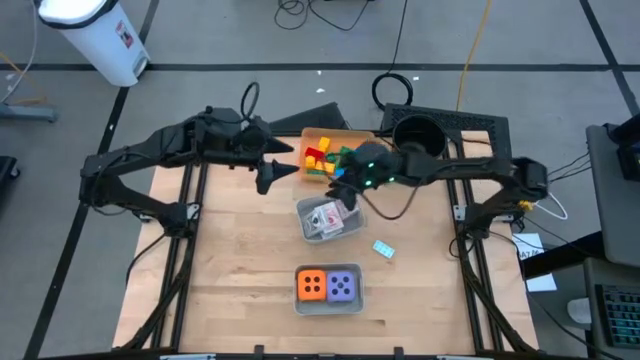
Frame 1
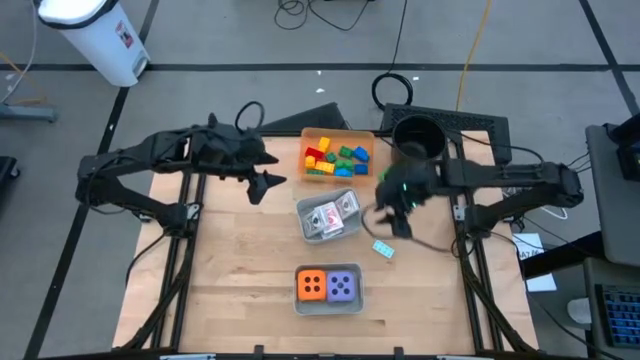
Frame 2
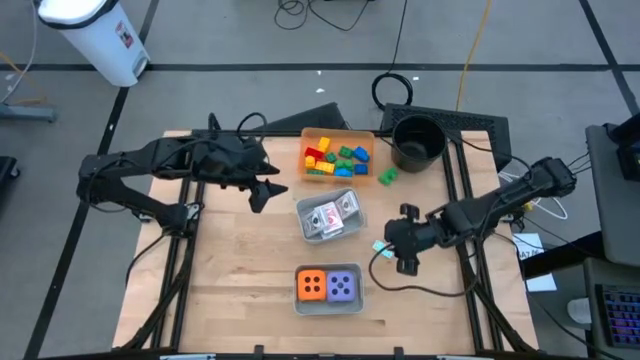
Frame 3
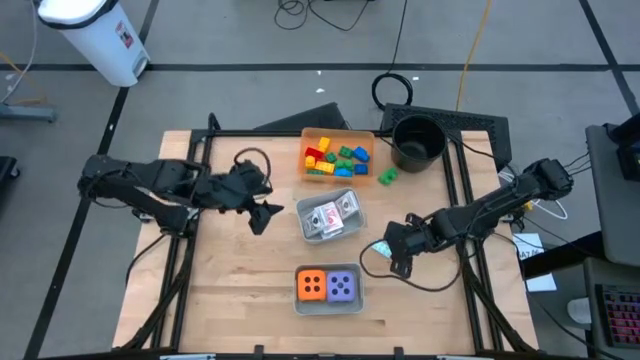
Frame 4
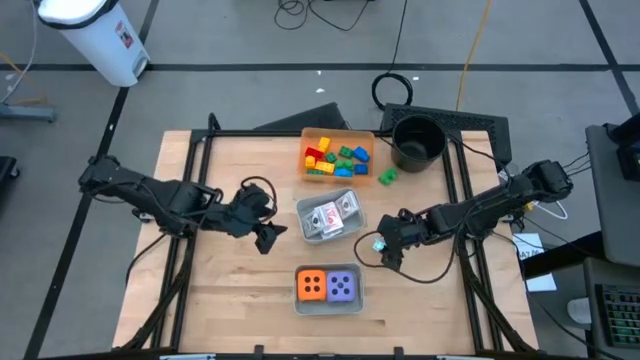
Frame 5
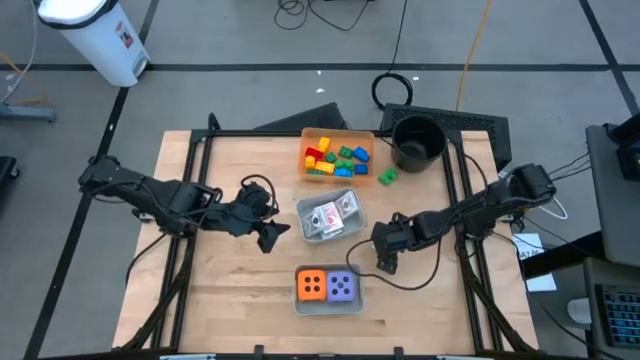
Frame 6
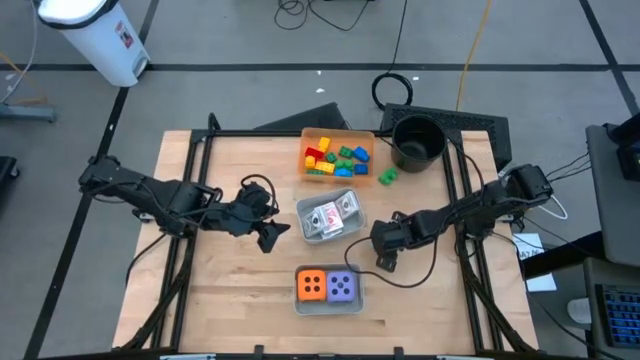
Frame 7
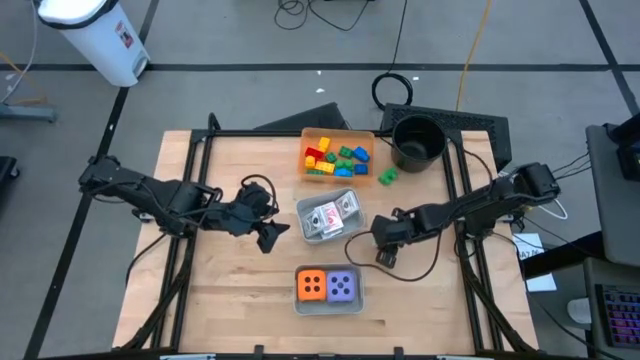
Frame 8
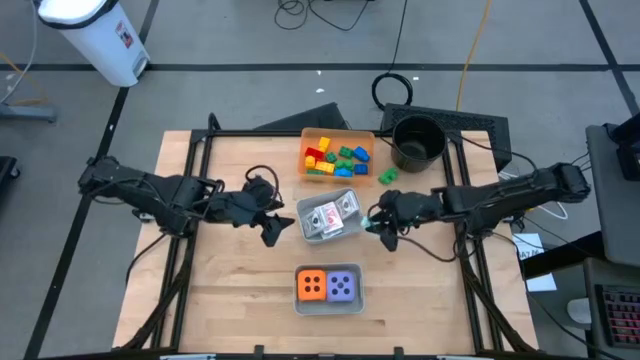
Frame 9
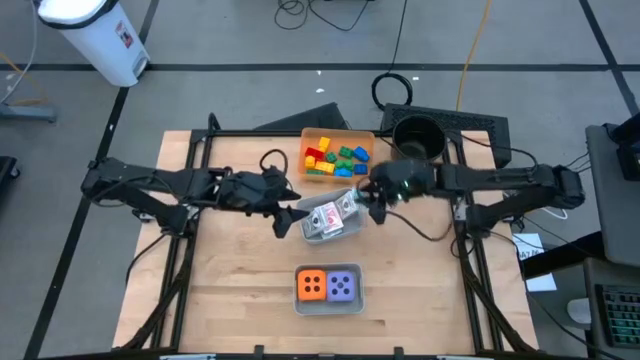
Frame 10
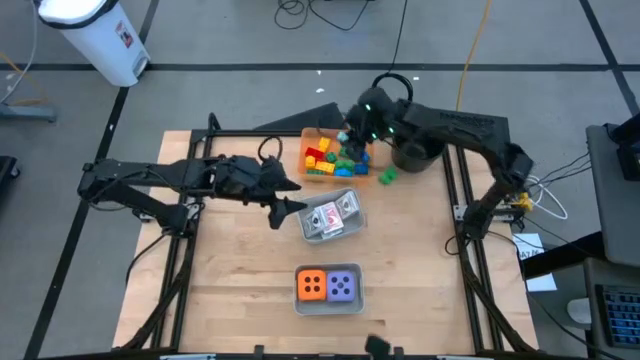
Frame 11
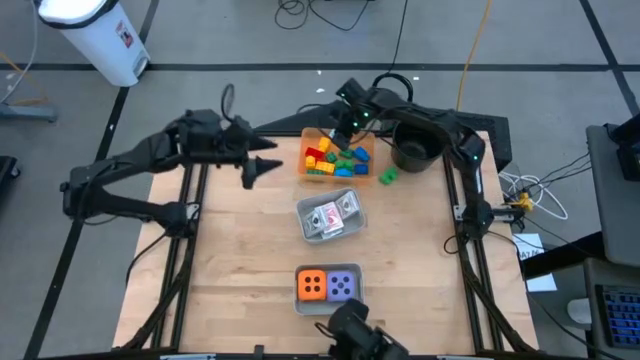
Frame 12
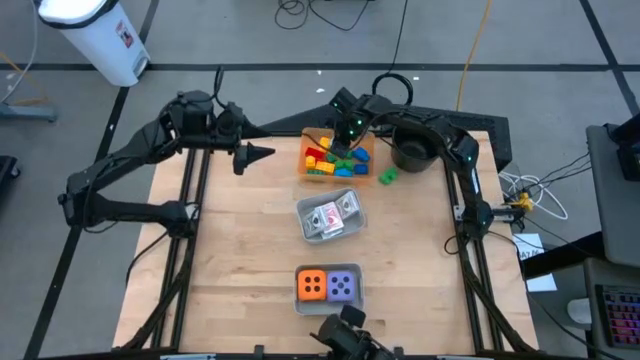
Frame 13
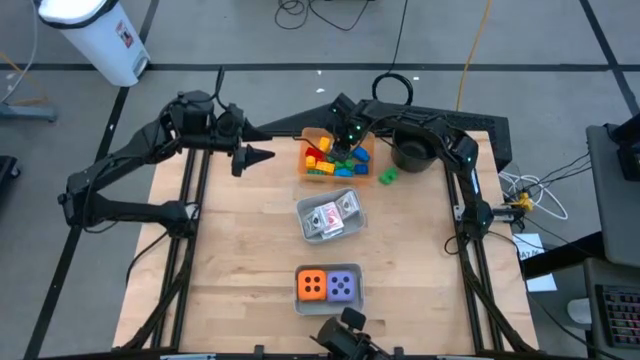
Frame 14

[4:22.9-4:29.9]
Task: Pick & Place Toys
Put the light blue game piece into the orange bin

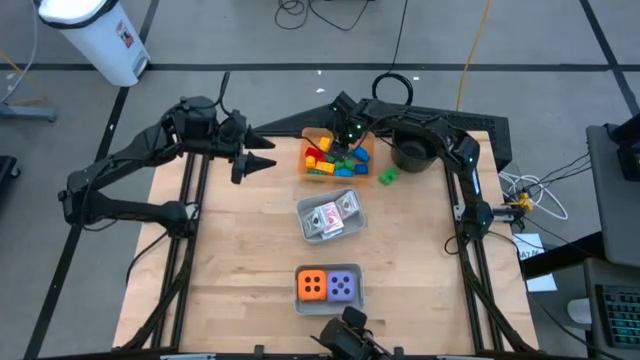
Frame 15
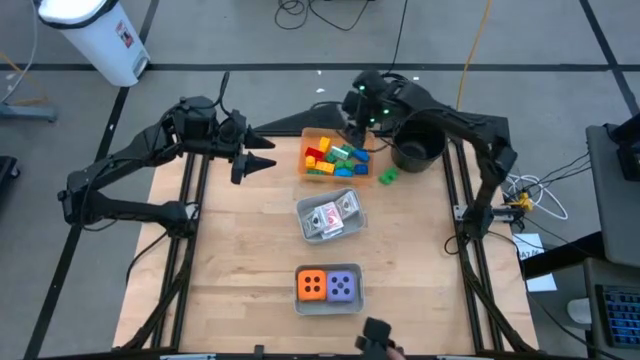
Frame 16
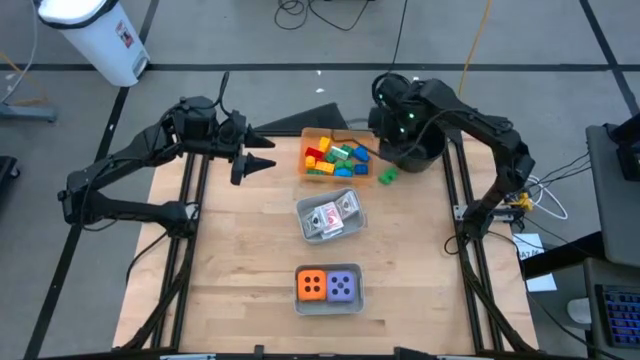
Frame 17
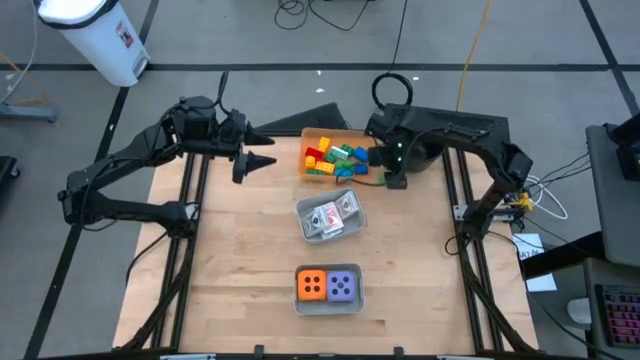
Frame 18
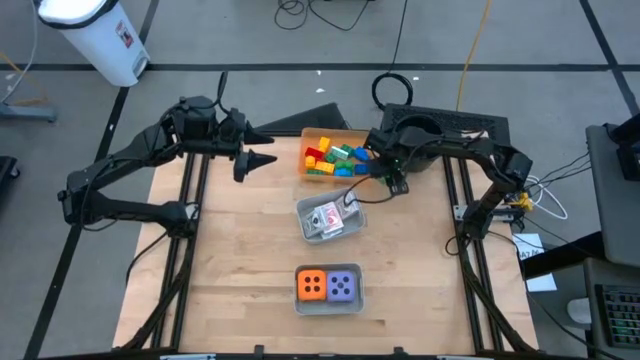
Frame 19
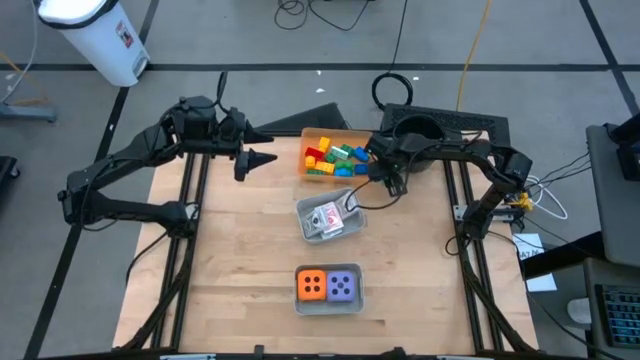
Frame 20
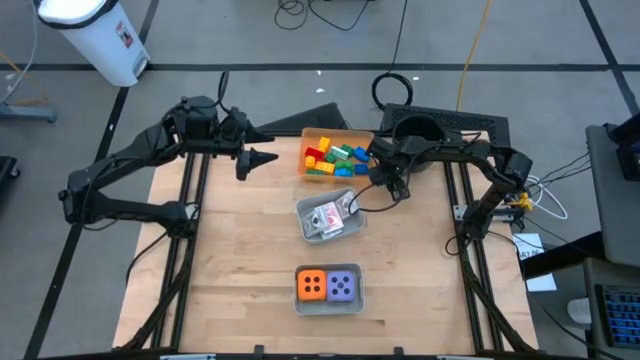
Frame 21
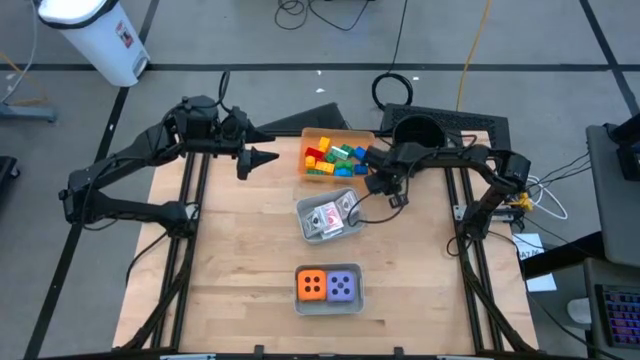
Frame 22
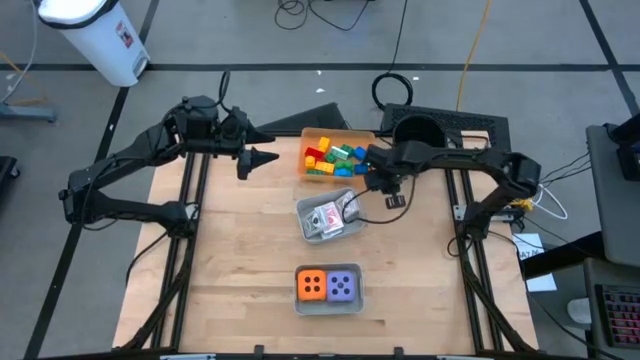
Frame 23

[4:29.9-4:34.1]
Put the green game piece into the orange bin

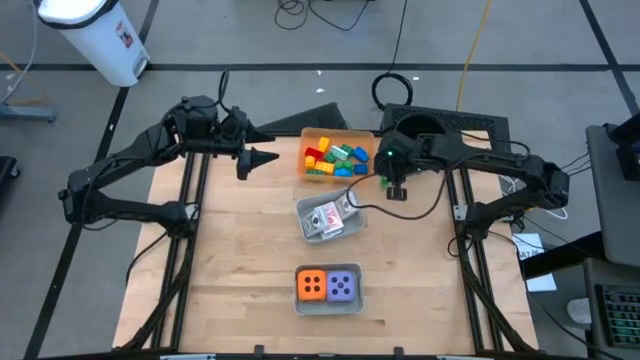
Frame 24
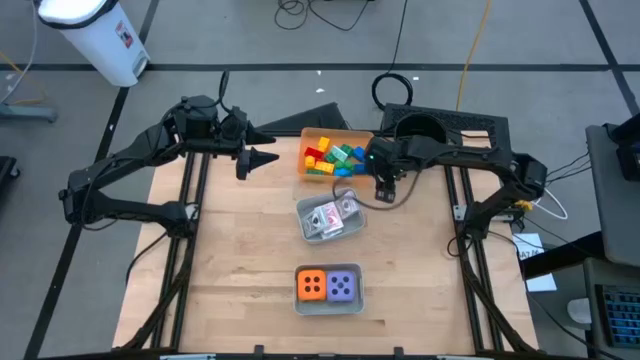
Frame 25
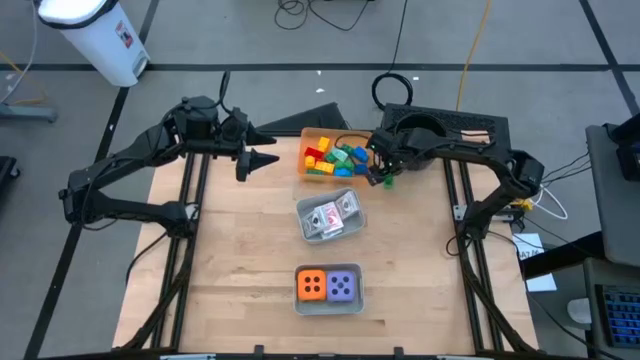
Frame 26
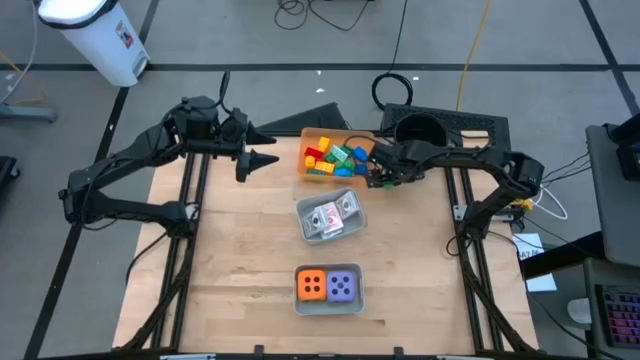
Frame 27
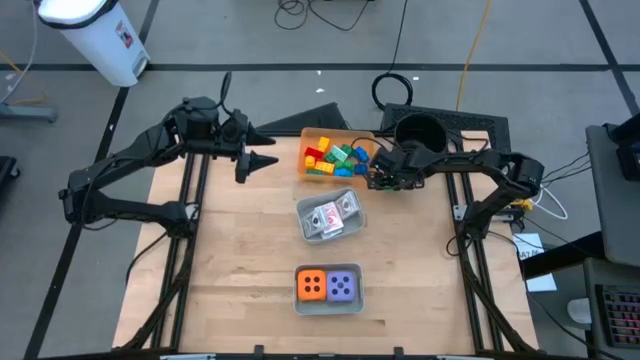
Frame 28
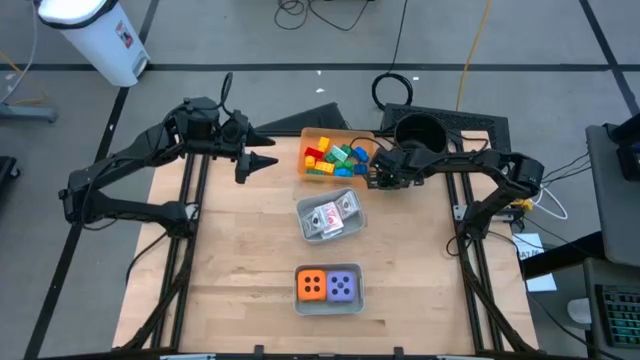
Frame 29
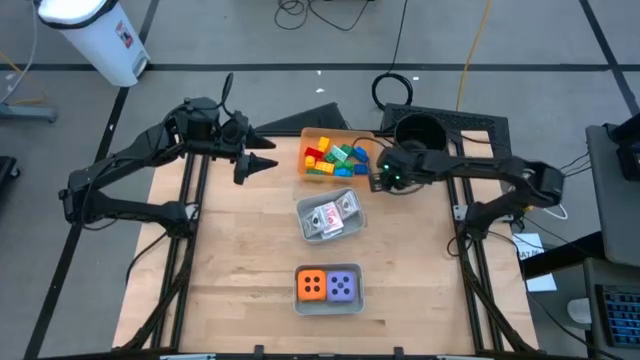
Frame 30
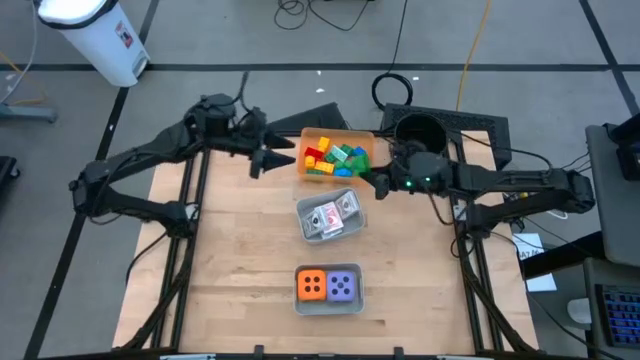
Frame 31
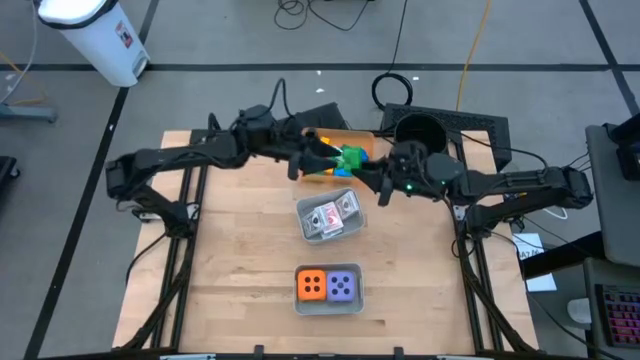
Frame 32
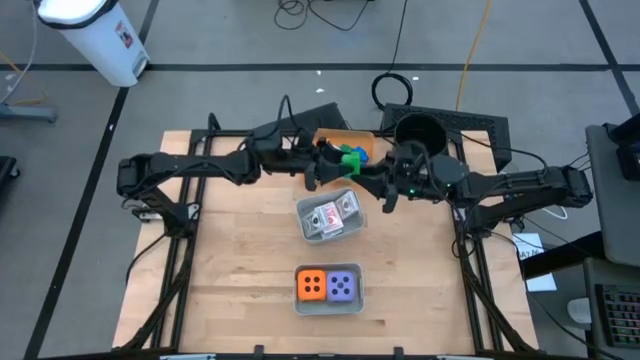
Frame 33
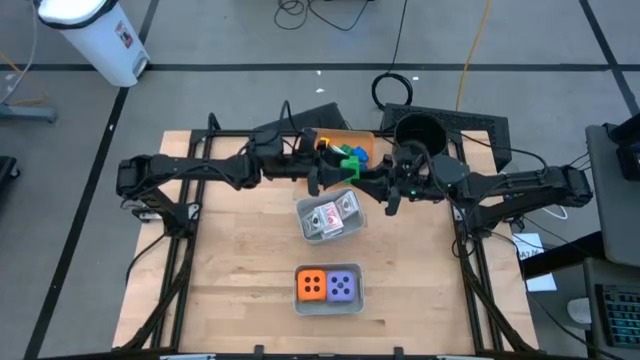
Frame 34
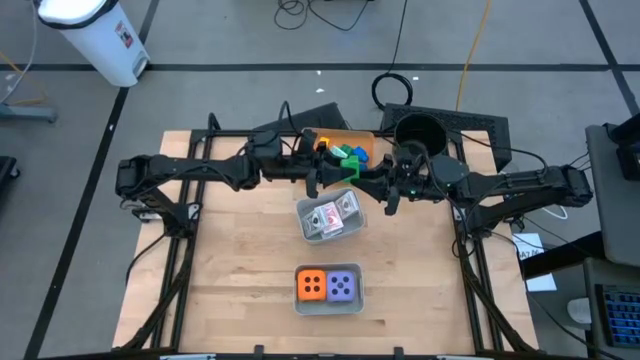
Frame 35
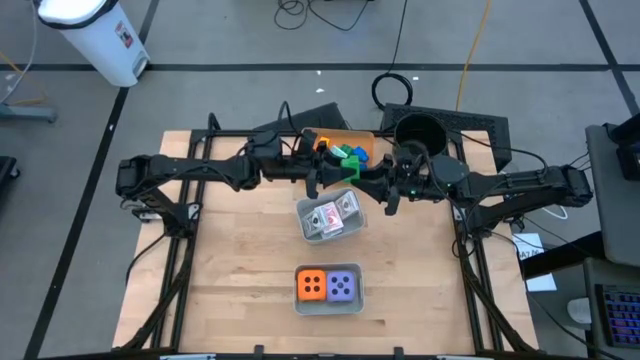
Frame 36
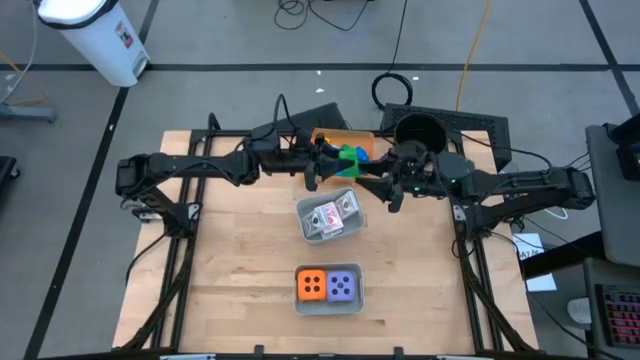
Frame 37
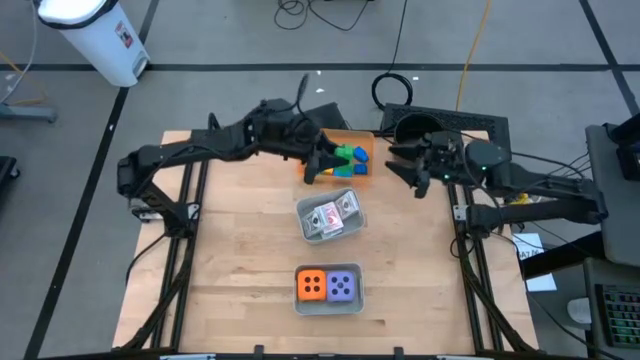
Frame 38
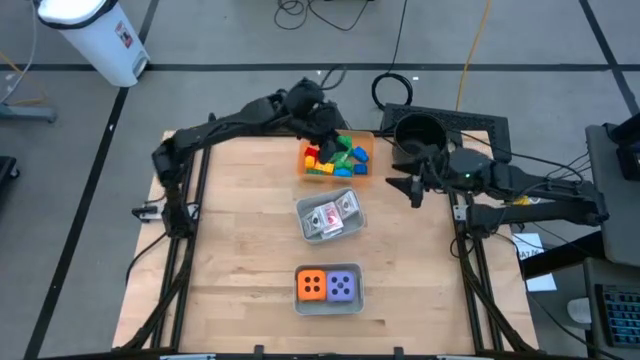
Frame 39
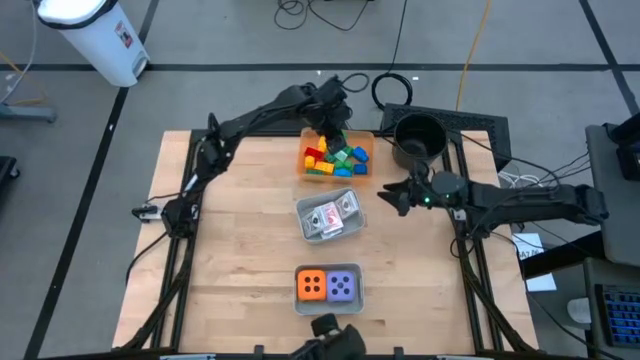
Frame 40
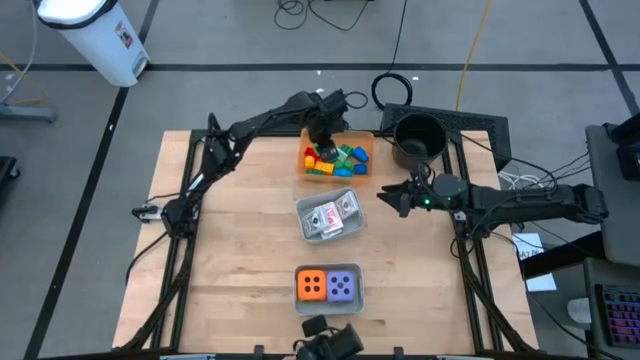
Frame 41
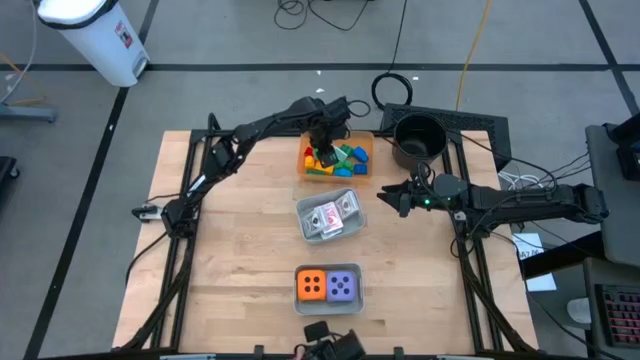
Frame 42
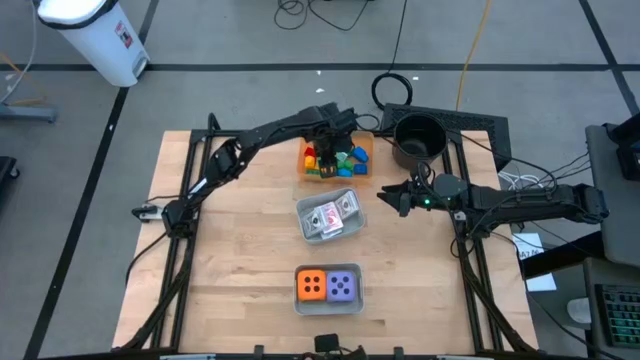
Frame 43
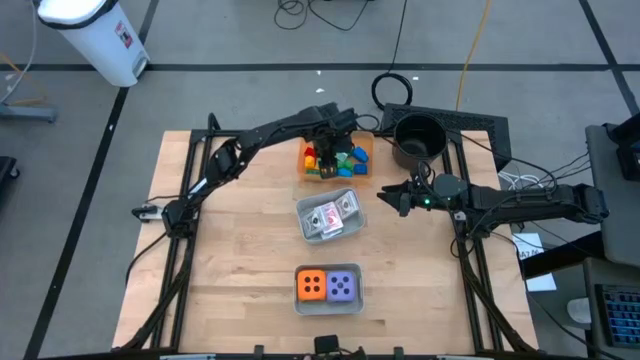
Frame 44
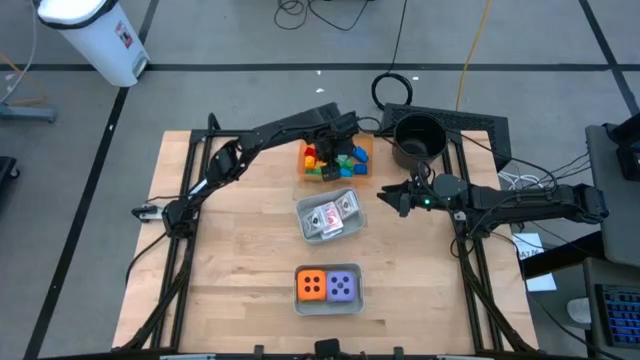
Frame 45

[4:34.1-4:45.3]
Put the green game piece into the orange bin
